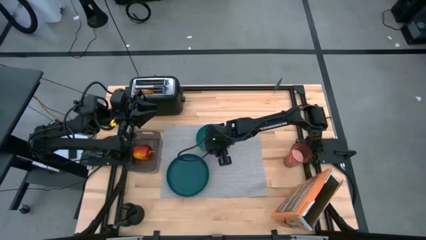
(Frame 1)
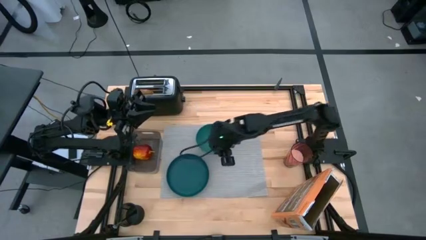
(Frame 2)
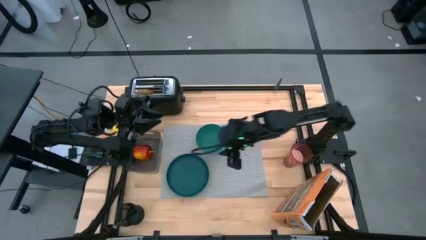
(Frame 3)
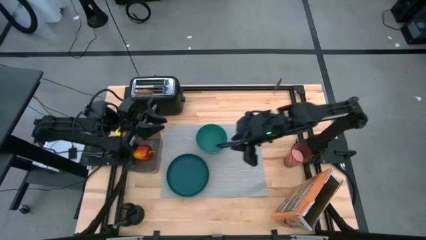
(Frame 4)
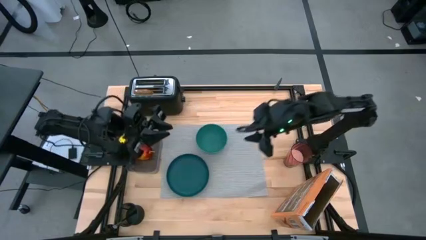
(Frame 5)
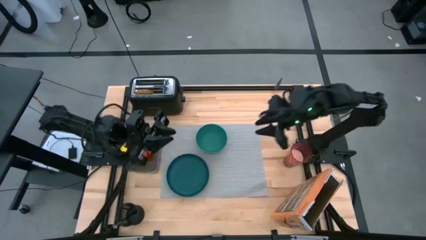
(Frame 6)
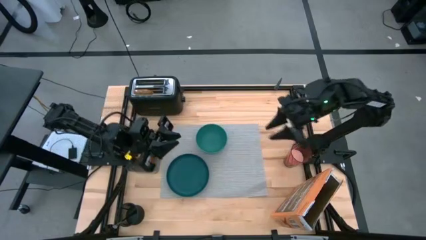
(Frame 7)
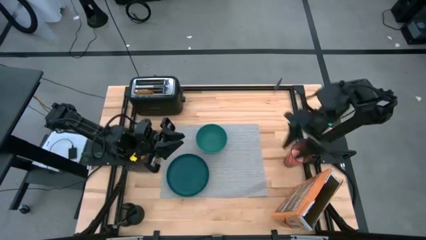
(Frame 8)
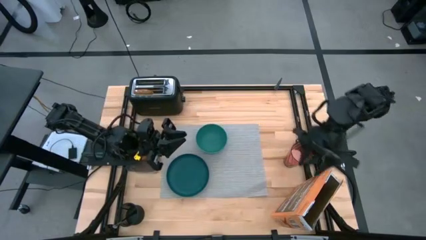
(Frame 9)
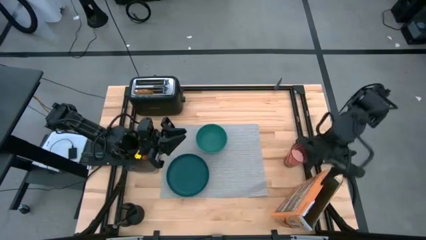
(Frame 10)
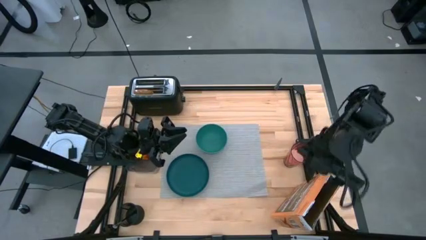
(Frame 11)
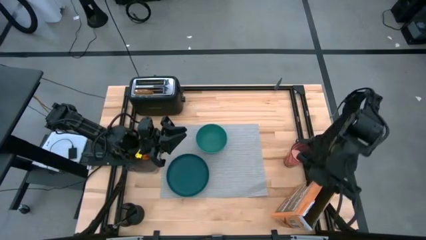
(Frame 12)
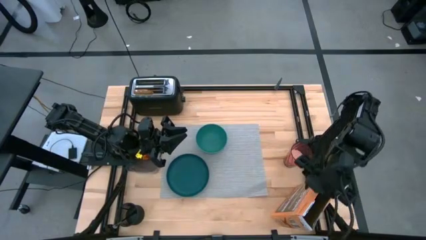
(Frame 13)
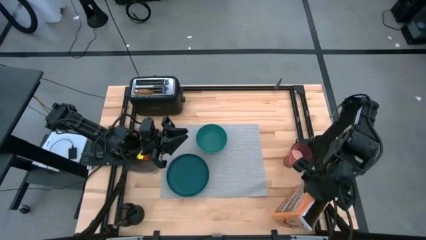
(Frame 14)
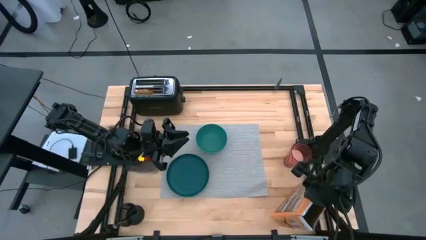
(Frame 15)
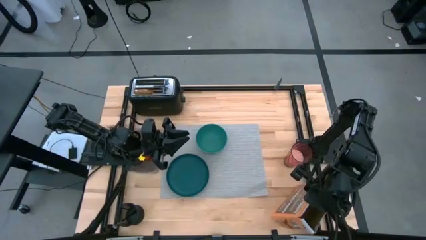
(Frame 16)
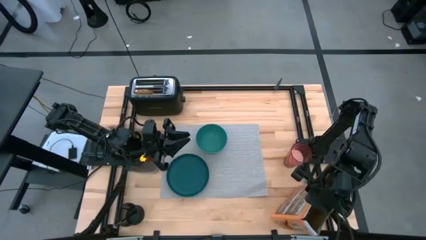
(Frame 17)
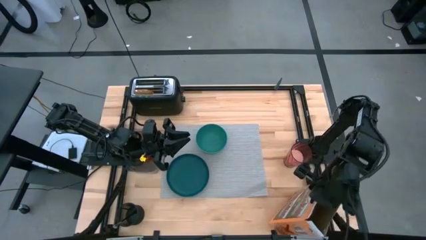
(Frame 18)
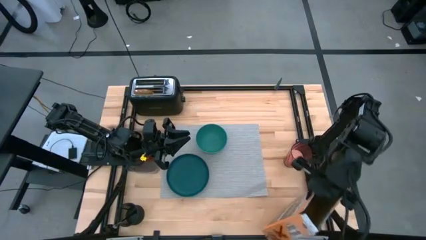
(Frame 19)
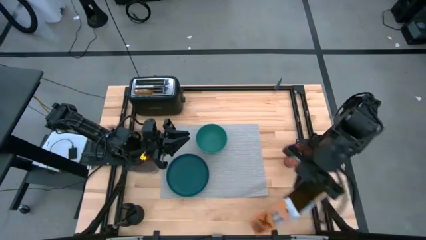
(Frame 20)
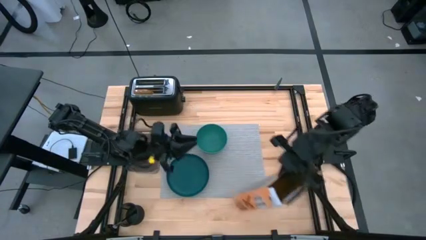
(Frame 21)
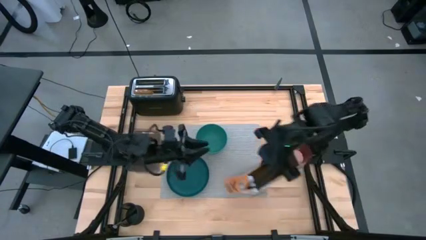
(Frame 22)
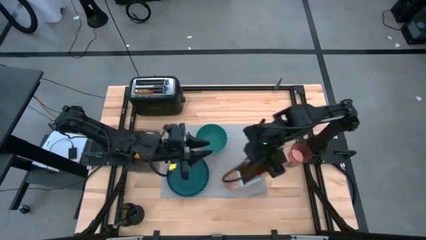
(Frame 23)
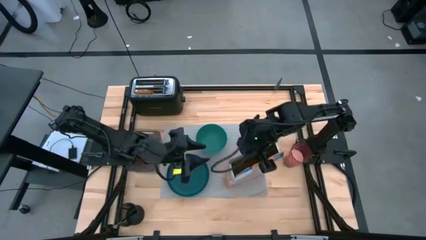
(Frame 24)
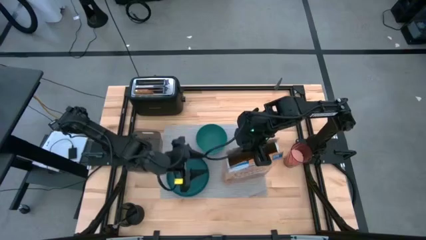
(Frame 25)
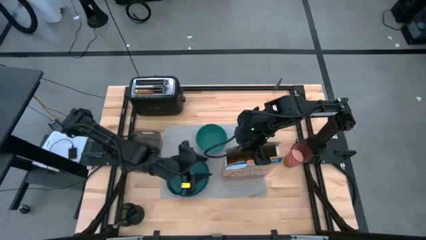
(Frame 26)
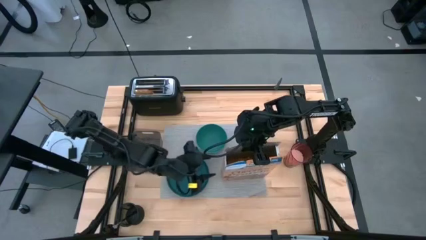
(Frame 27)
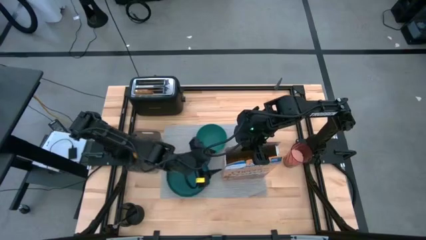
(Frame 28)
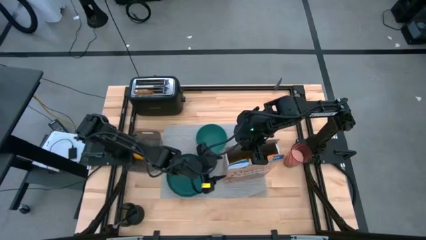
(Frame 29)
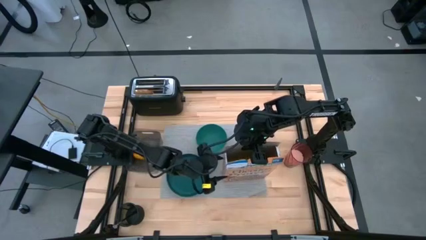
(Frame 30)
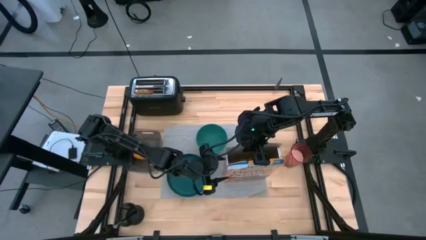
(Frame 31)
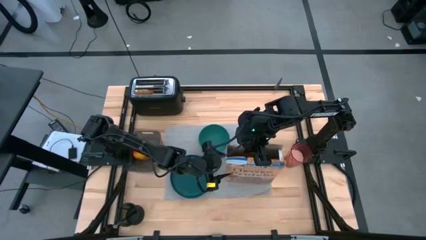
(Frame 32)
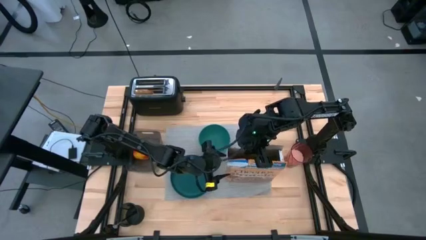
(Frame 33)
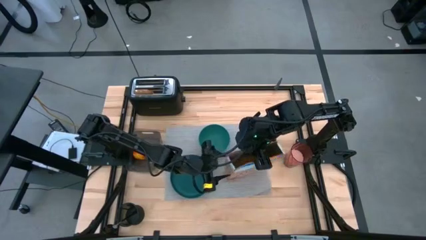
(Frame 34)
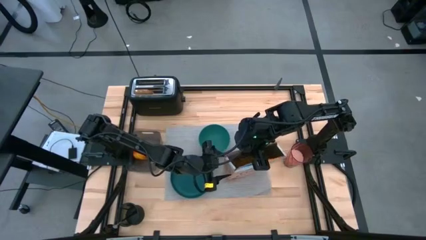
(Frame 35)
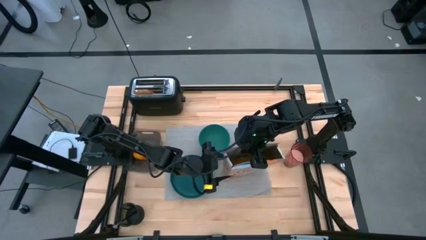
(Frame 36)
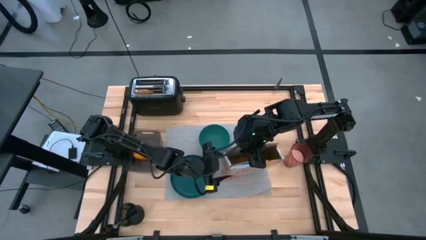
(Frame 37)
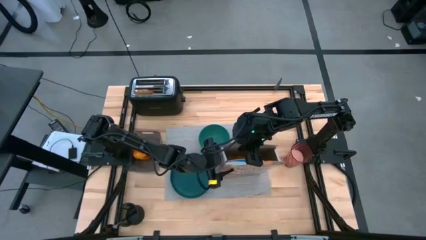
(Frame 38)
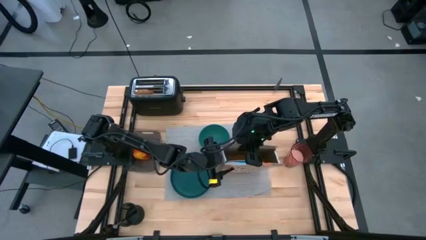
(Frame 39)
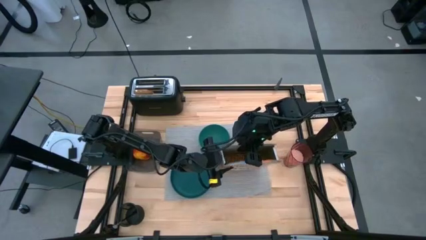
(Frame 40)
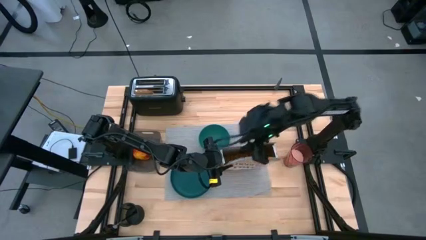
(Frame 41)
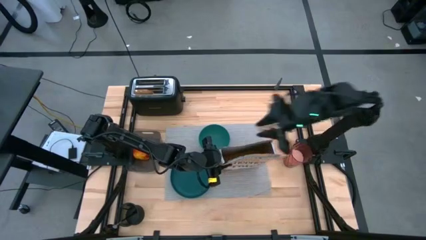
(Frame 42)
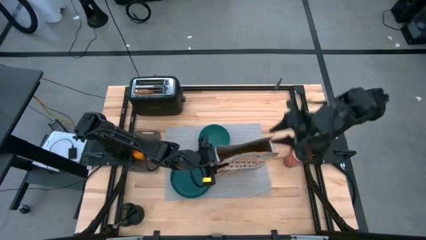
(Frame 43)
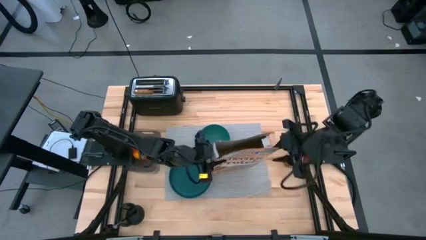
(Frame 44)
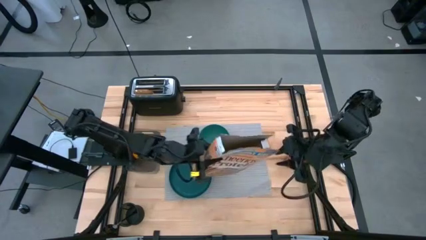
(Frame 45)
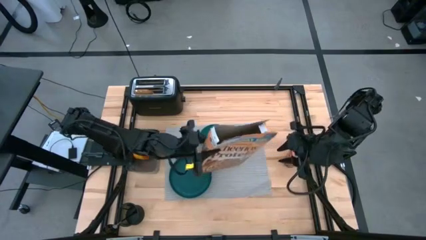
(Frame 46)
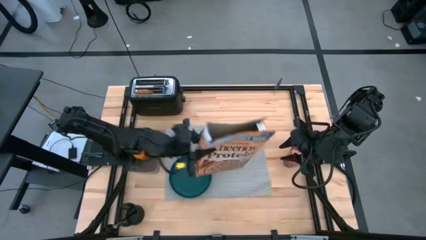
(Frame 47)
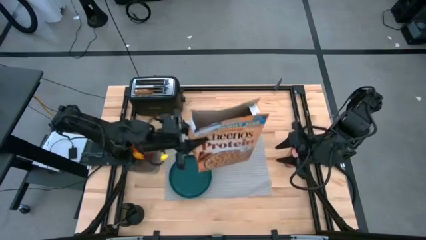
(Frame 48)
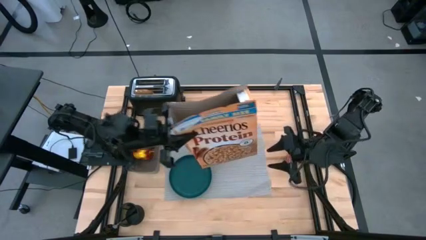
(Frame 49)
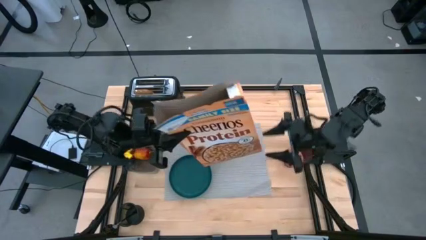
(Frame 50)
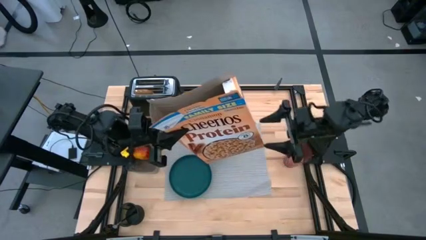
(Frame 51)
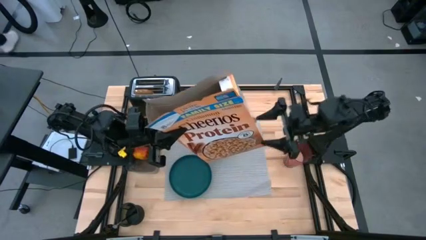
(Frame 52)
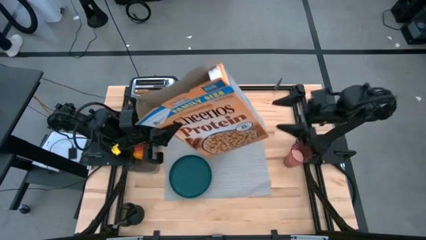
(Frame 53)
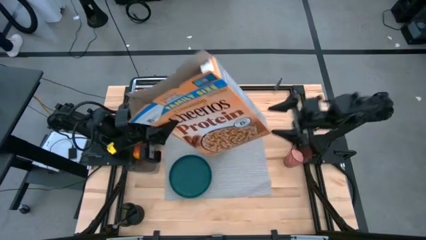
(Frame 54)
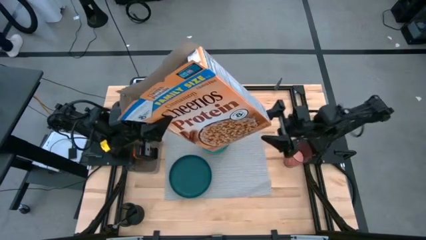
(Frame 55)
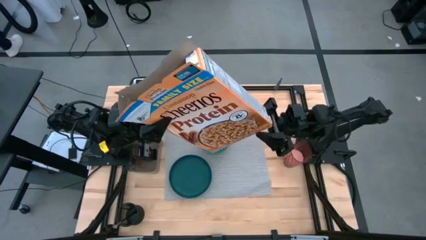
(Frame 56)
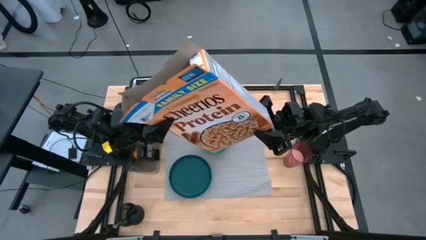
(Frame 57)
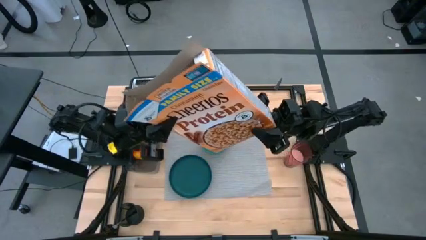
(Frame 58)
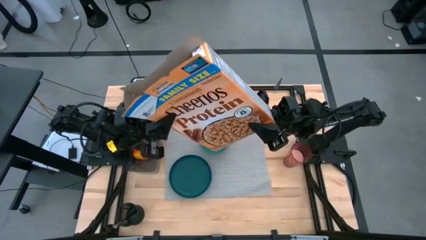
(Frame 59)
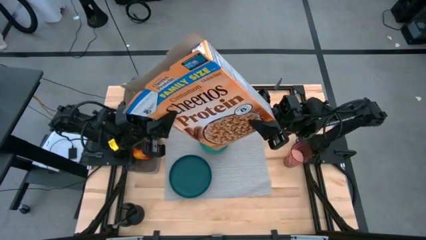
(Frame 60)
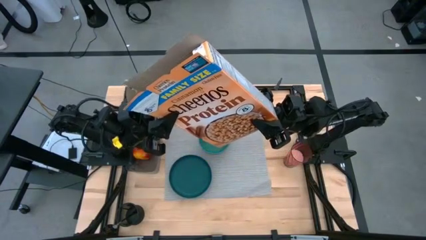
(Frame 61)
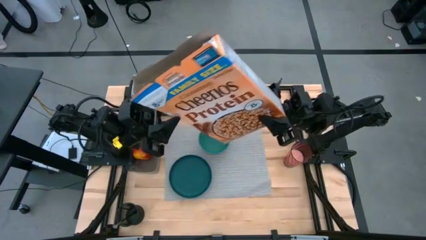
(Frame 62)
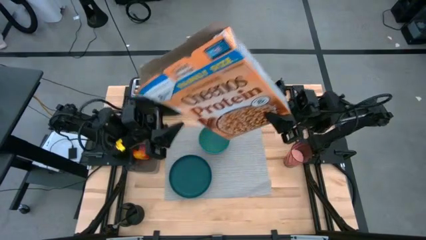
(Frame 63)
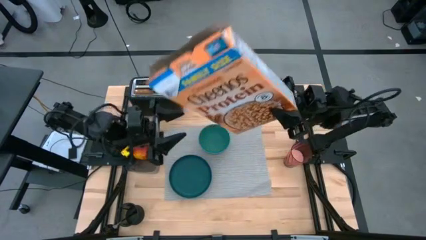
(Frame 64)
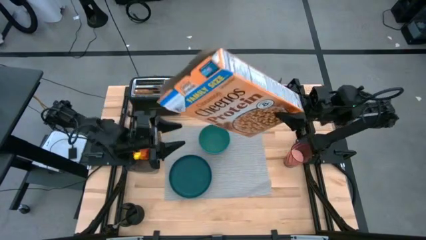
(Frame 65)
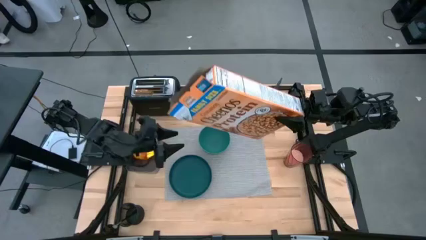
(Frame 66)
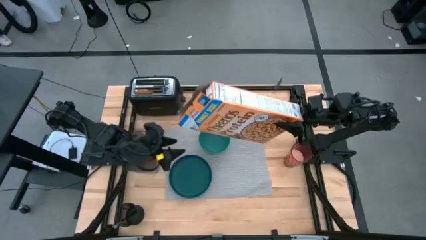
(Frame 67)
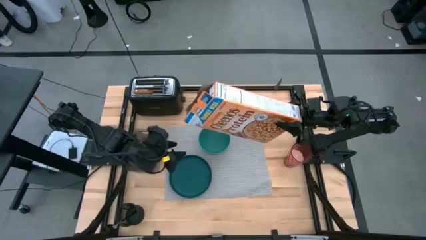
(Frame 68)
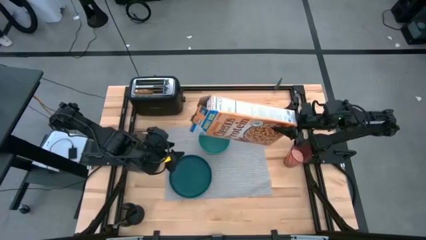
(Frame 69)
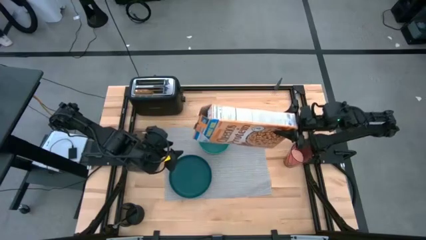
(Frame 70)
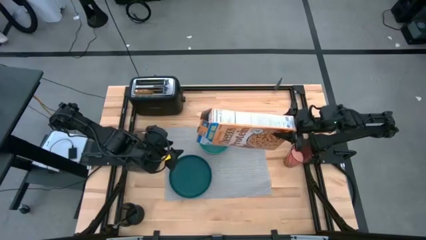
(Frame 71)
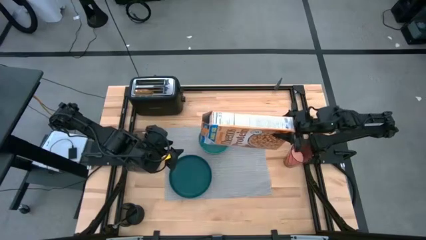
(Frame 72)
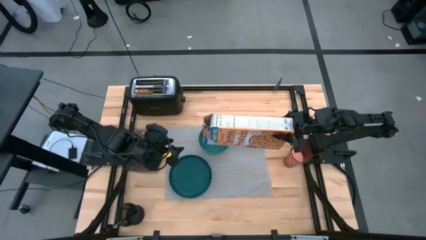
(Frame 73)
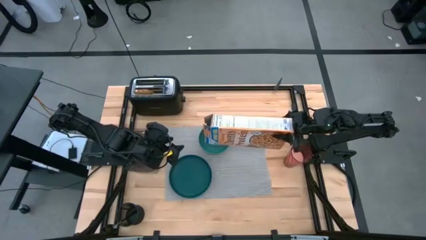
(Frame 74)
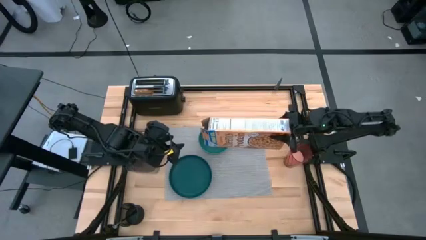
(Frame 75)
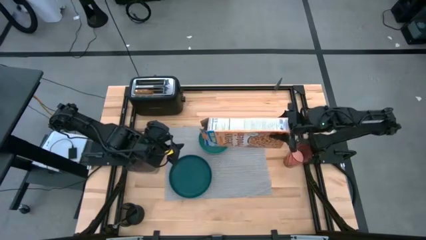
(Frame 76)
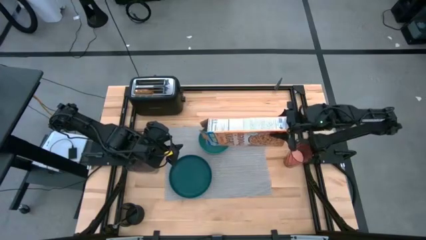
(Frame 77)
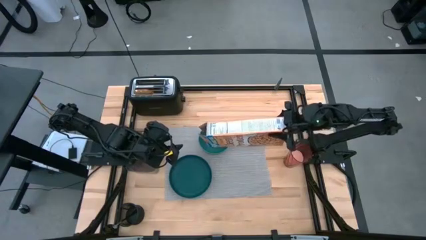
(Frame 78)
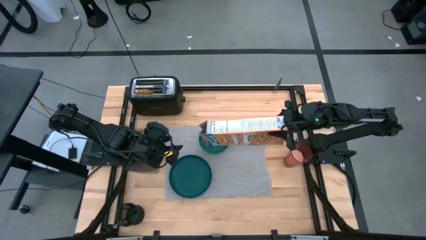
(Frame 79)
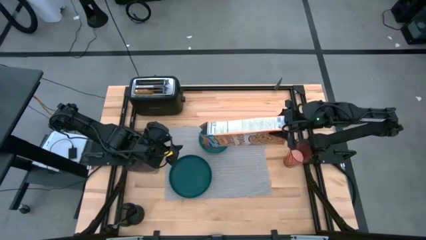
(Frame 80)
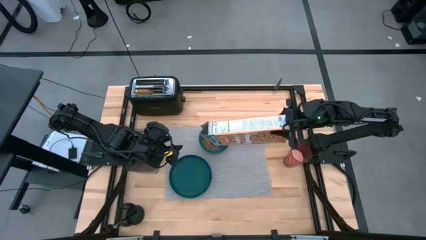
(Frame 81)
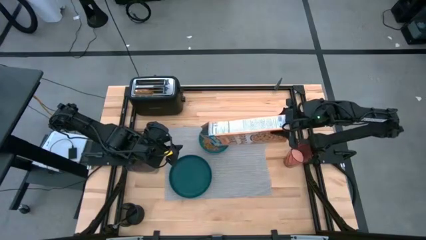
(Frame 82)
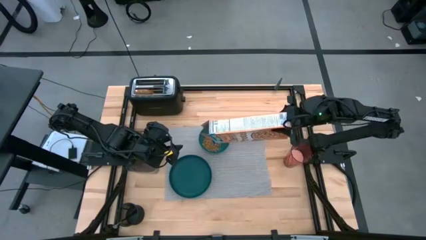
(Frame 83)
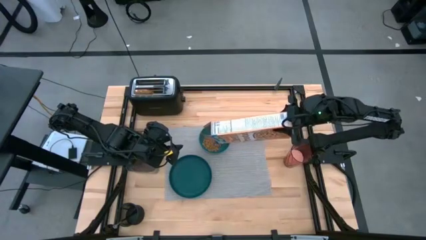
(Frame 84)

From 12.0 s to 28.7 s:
Task: Arrange a breakfast setting
Pour the cereal in the green bowl
